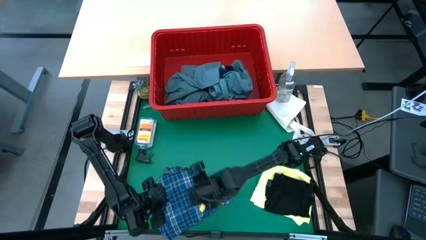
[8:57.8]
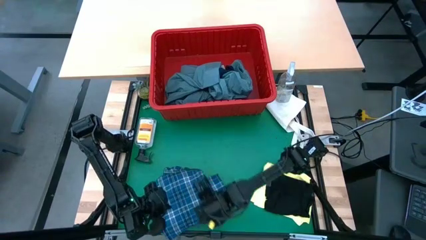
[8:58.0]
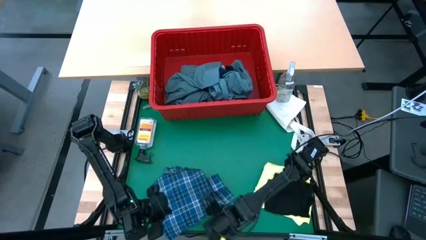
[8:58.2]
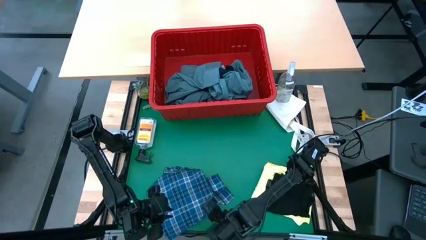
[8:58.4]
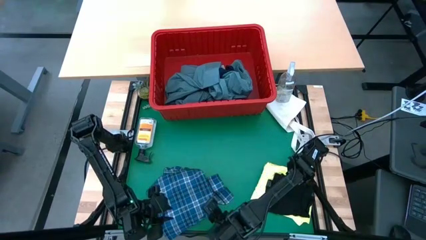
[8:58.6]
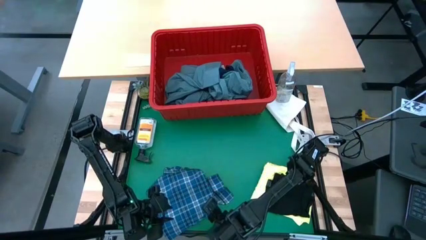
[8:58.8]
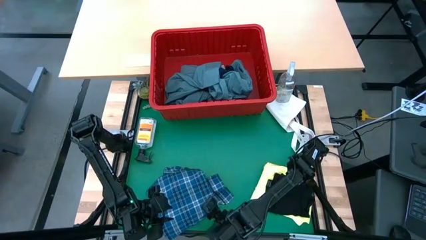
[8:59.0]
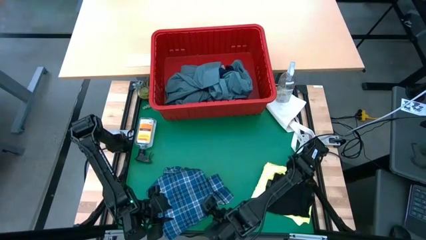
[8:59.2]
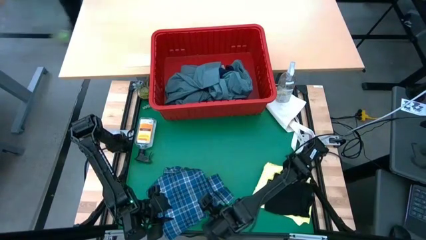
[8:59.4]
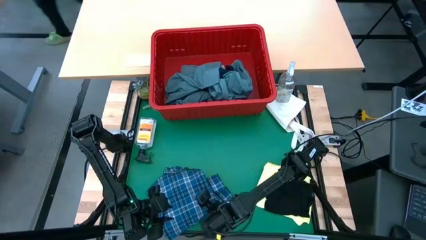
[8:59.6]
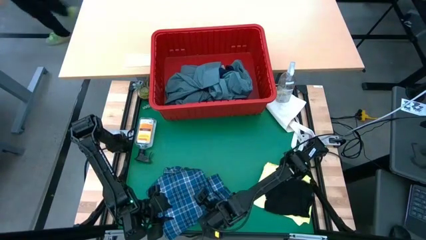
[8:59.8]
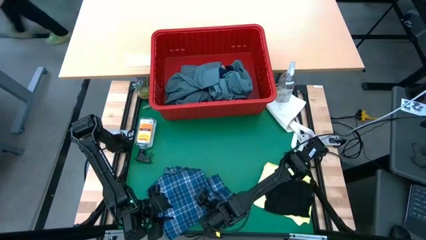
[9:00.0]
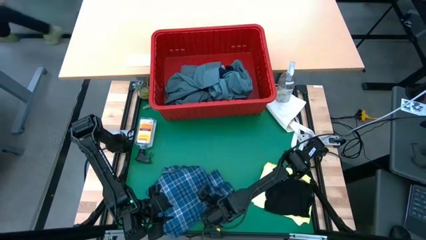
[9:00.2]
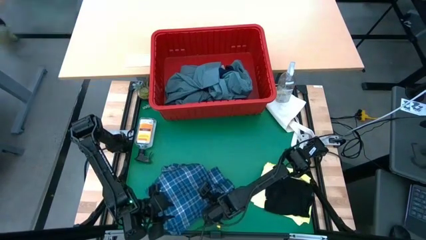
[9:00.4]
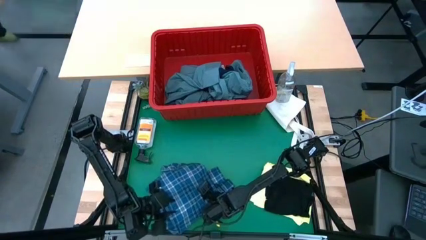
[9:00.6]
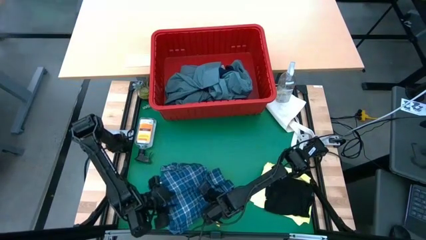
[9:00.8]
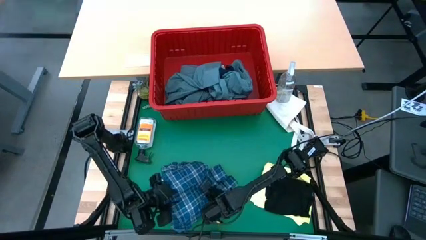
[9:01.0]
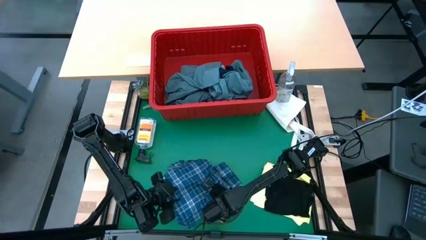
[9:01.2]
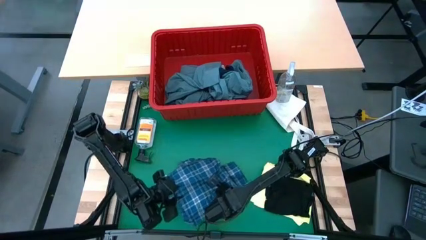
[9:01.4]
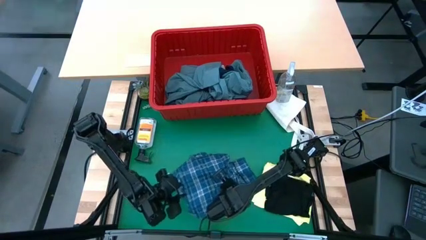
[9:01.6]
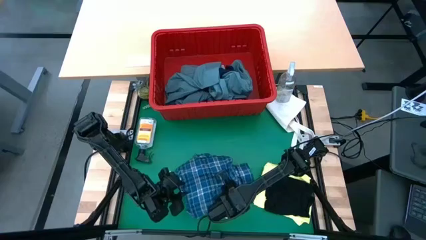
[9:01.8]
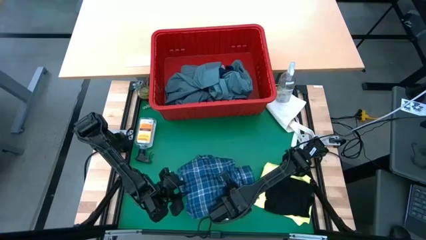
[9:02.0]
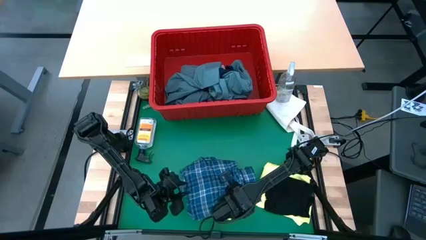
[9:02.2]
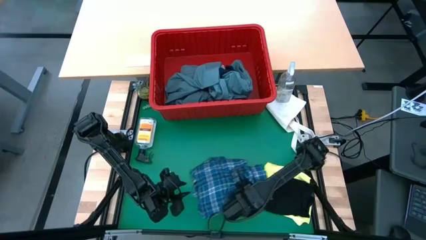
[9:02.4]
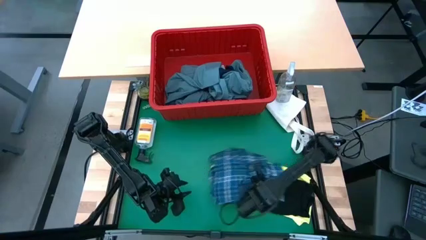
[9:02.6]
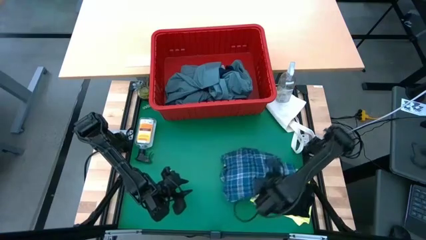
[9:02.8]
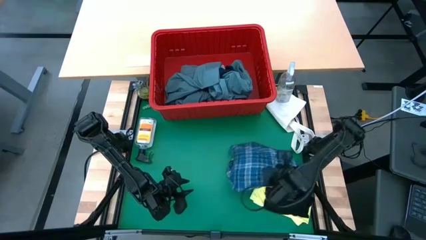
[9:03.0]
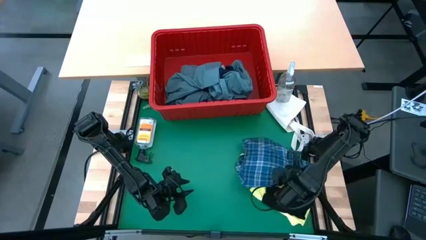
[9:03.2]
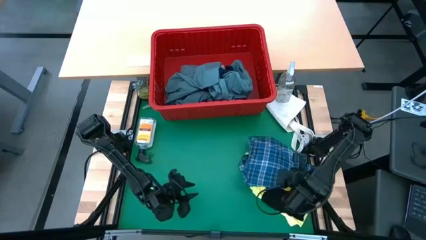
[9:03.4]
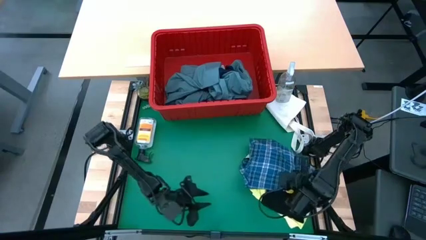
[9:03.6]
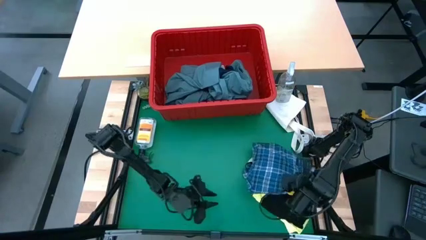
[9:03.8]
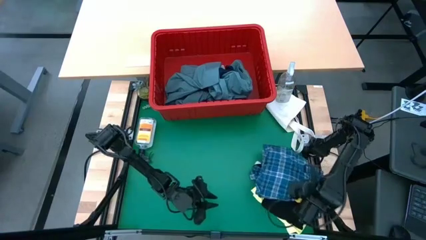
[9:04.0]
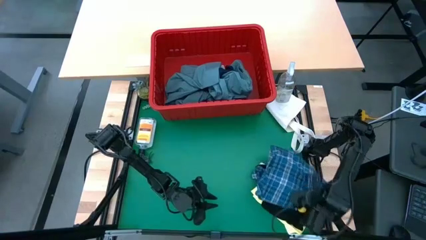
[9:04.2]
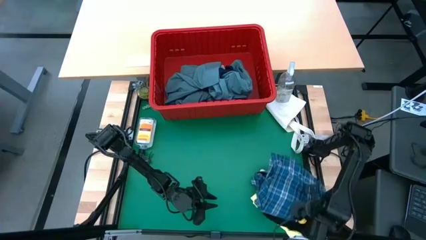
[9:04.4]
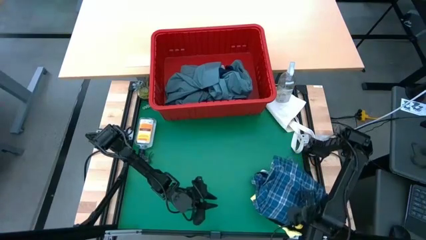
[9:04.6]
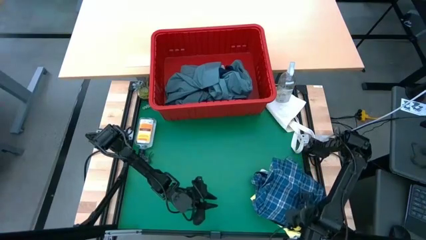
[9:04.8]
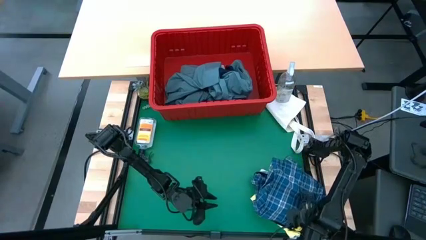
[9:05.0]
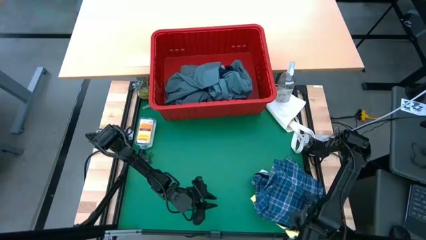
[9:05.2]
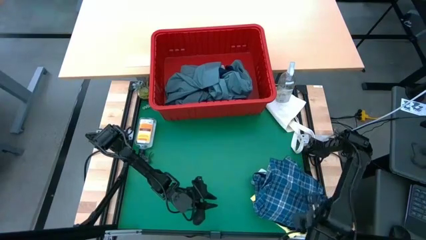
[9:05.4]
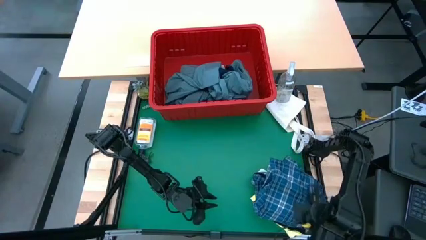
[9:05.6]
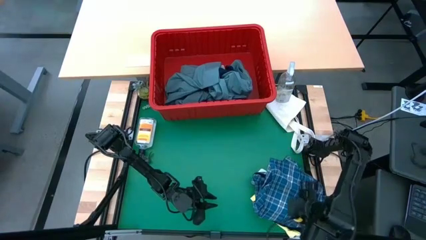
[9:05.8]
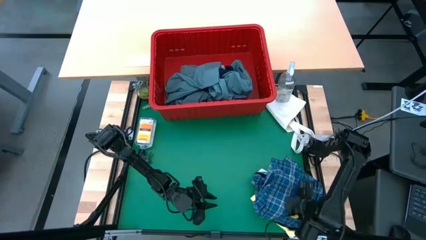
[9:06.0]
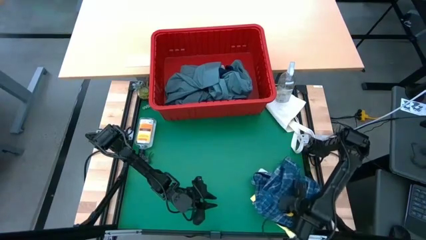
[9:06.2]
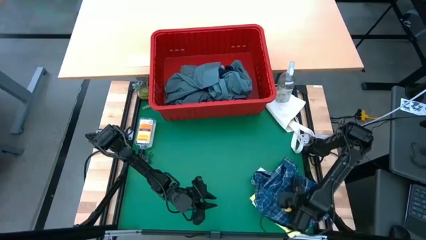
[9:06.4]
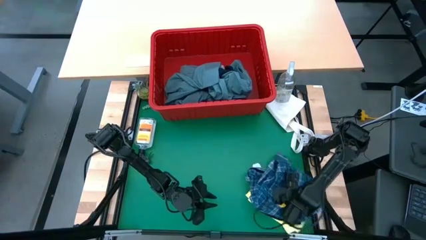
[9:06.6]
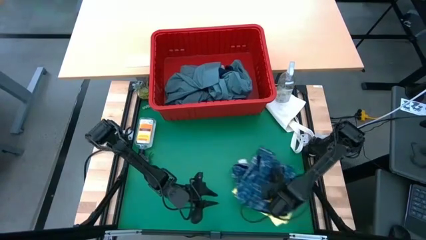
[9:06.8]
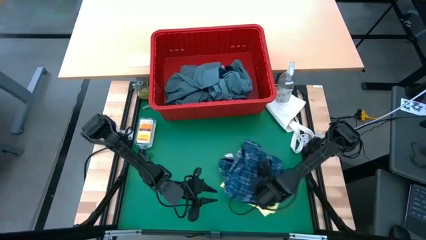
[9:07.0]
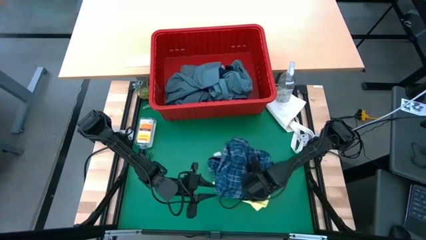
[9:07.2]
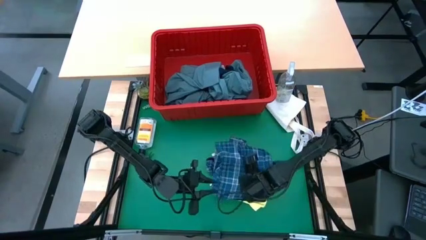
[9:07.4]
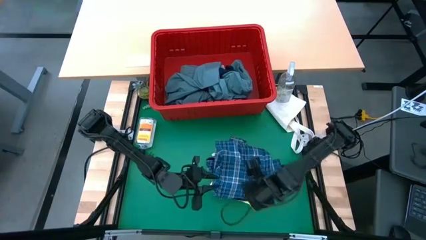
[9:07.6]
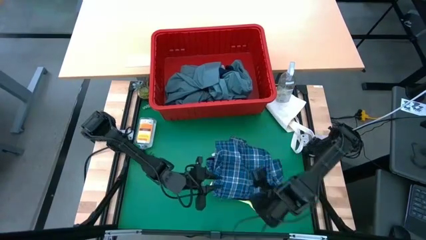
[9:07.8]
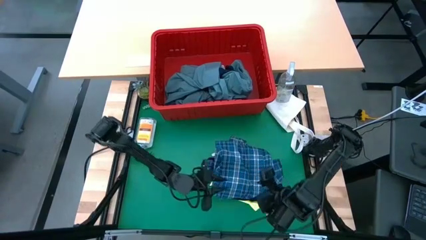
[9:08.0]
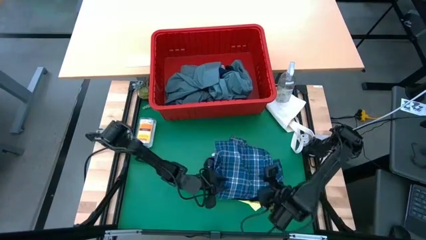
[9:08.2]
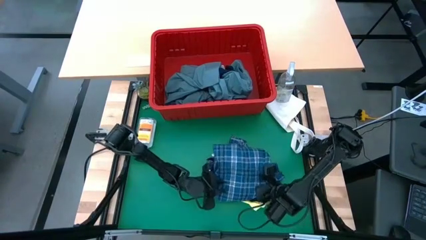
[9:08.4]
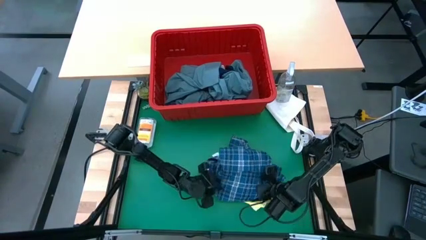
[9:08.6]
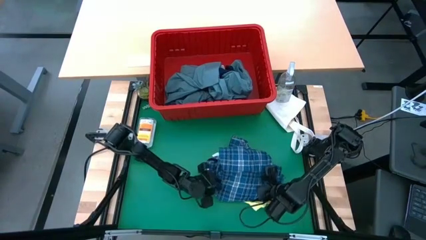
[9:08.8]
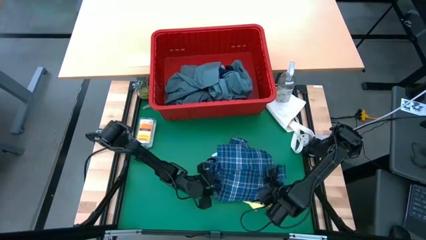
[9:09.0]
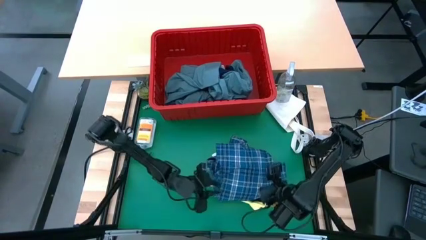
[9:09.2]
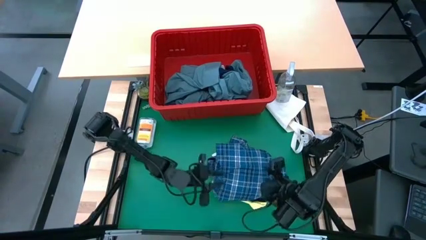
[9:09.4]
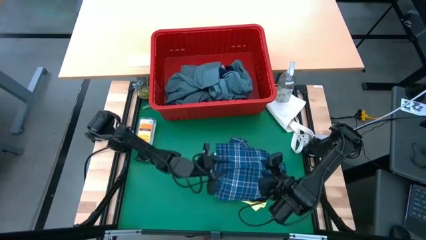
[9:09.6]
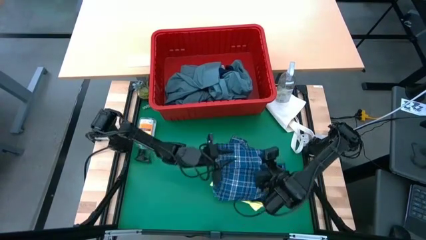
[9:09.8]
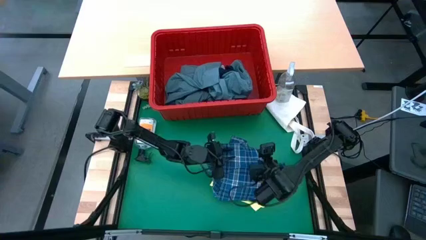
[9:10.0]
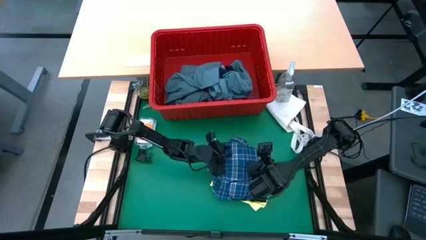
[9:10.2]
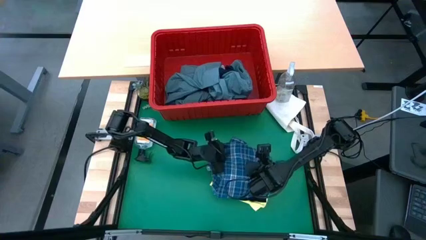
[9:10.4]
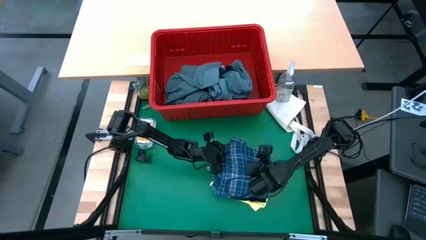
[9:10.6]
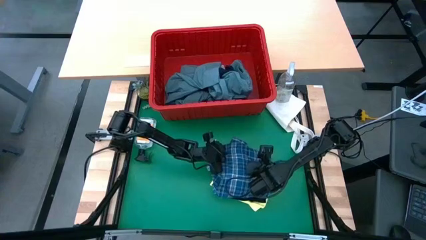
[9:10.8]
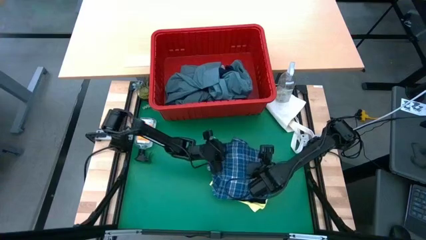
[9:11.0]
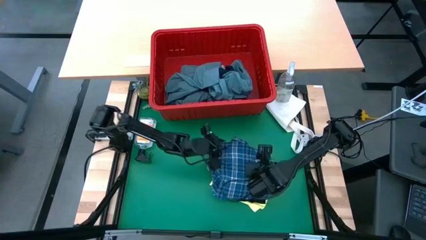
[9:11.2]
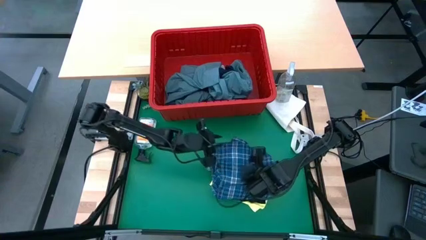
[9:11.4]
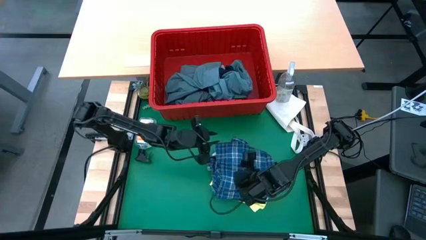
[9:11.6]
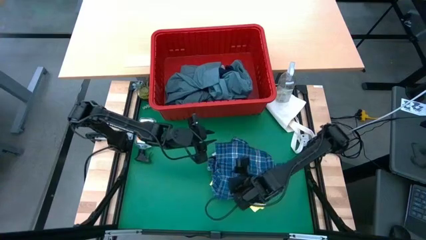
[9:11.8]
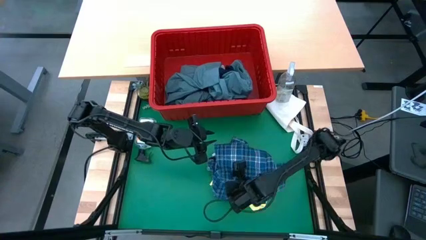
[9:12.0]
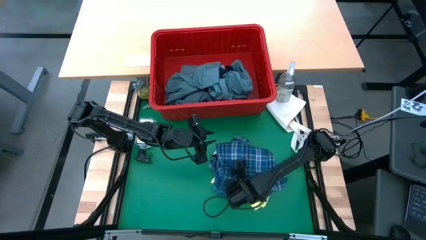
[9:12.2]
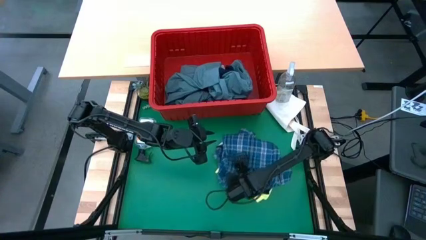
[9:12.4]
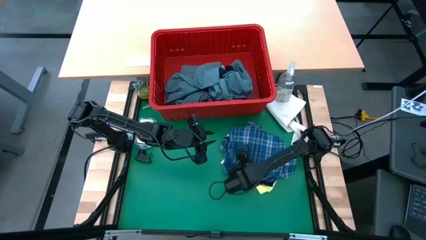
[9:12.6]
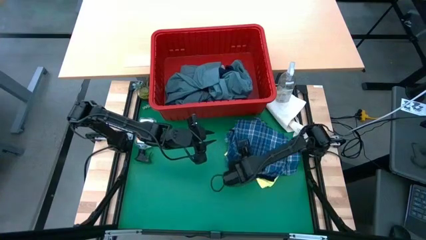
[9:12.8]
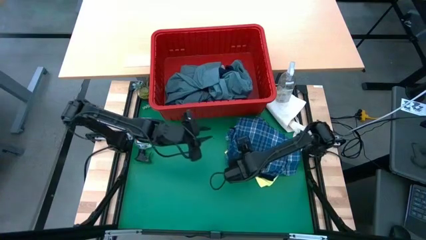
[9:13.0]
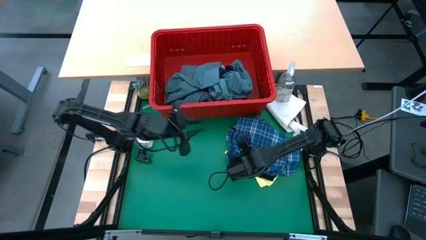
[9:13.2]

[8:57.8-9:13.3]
Task: Fold Laundry from Bin
Stack the blue shirt on top of the black underwear shorts
